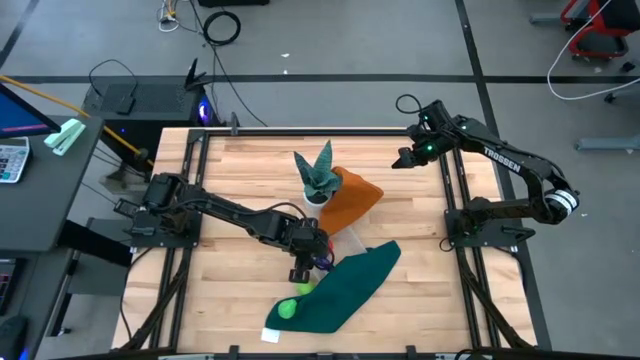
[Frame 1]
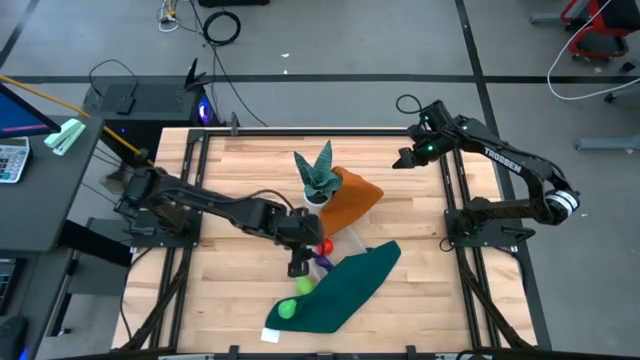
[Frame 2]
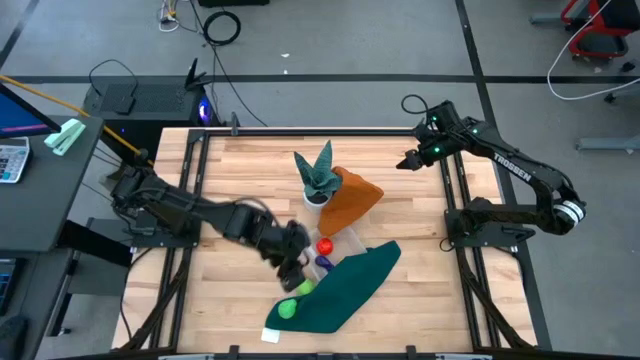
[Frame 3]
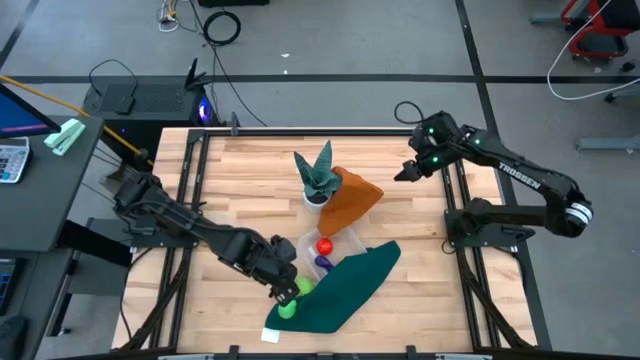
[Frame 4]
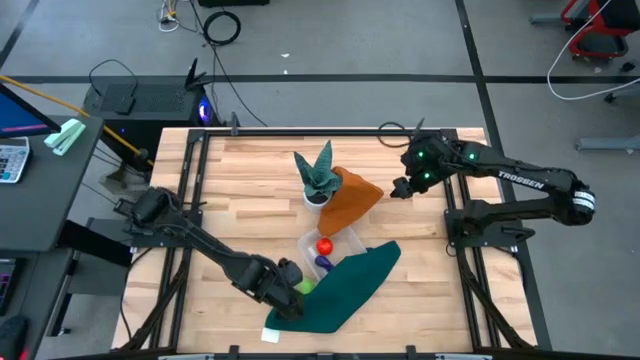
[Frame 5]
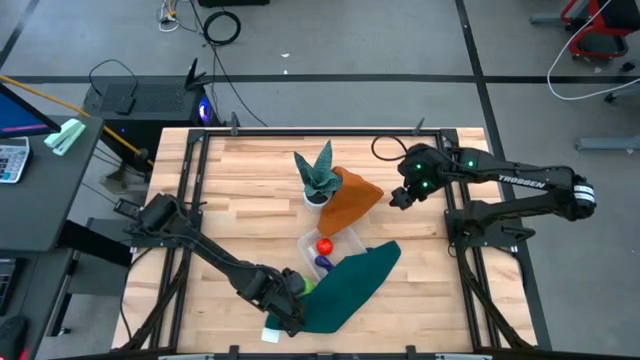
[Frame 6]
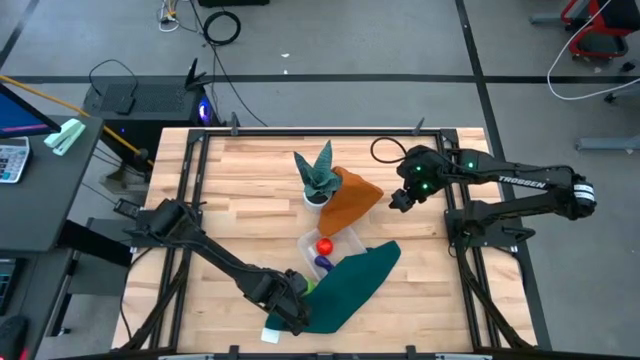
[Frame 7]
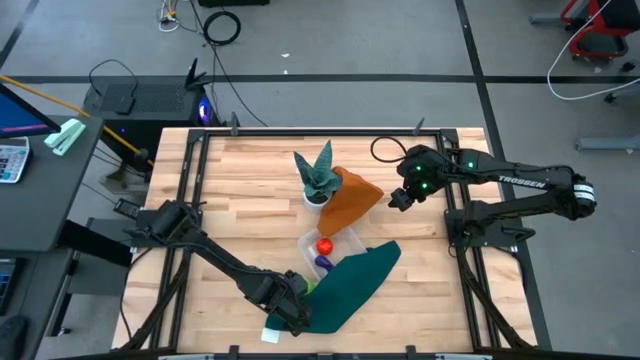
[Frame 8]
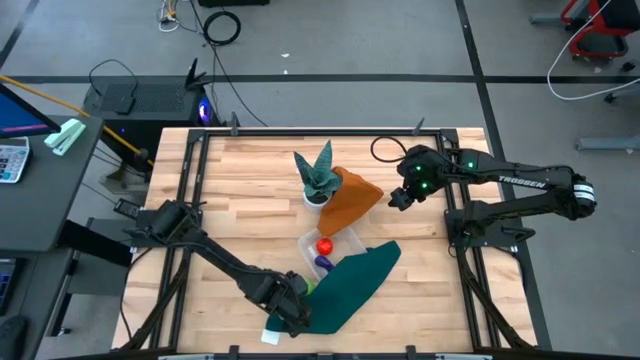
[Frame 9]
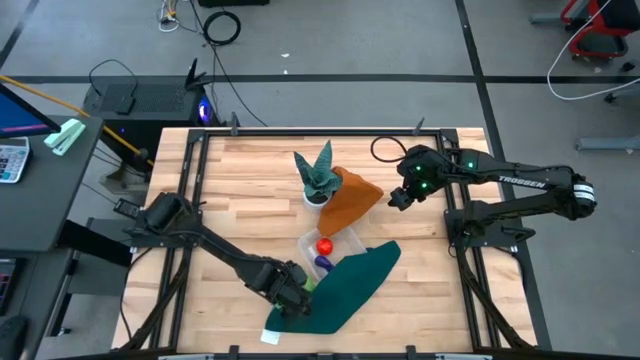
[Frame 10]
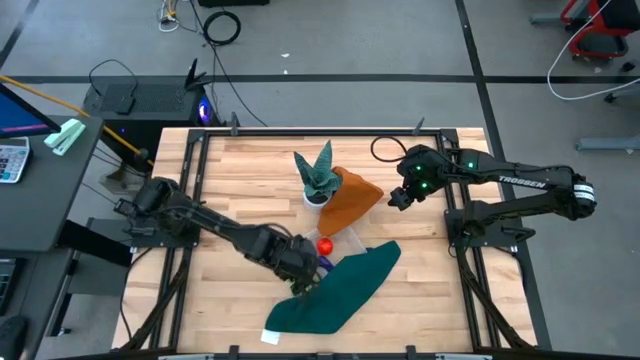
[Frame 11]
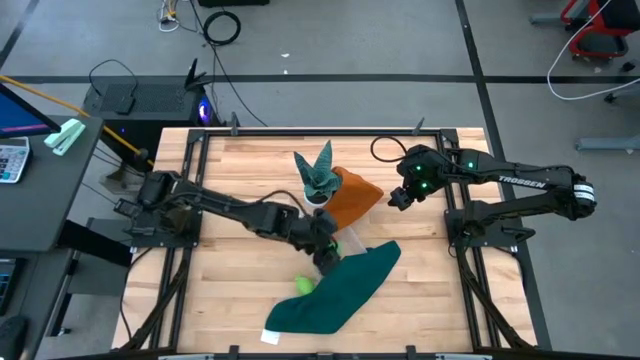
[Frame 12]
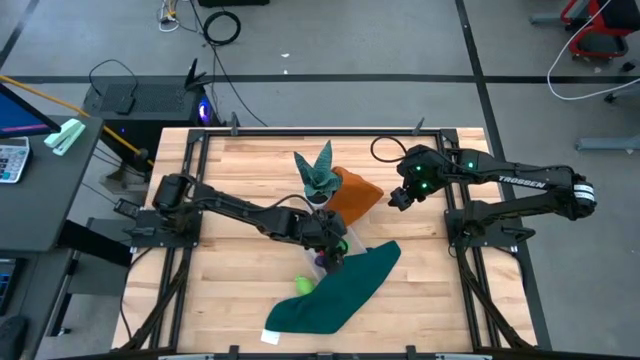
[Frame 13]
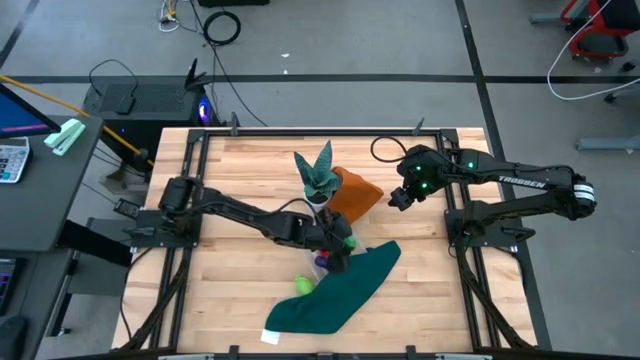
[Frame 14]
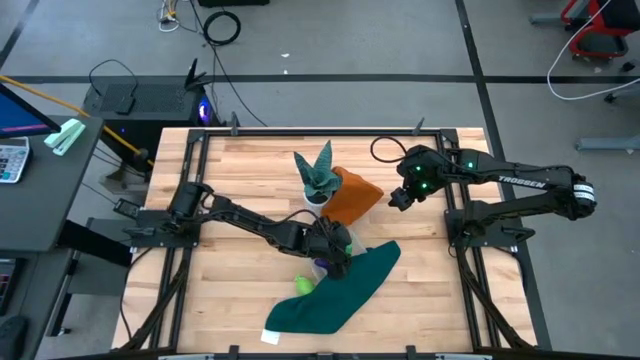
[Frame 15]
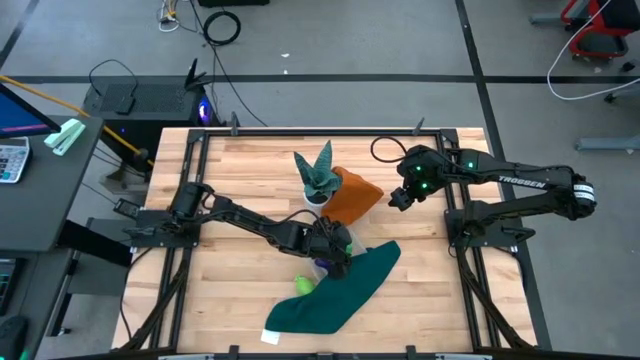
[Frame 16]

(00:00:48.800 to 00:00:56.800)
Task: Pick and placing Produce into tupperware
Put the green pear into the transparent bin

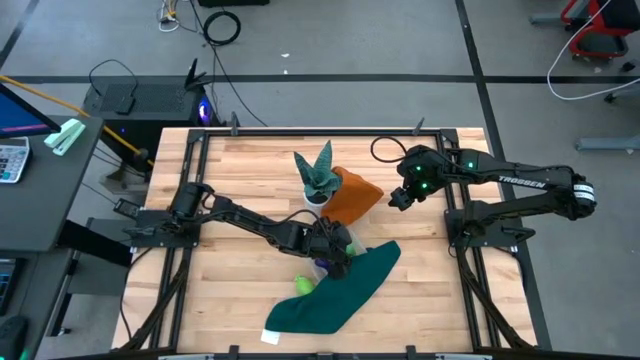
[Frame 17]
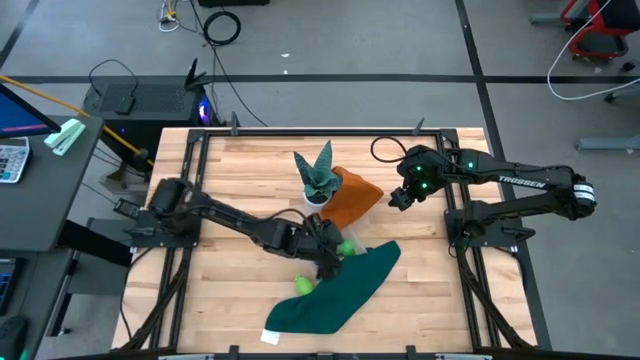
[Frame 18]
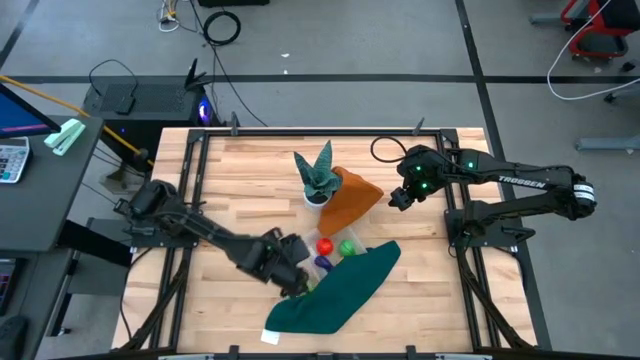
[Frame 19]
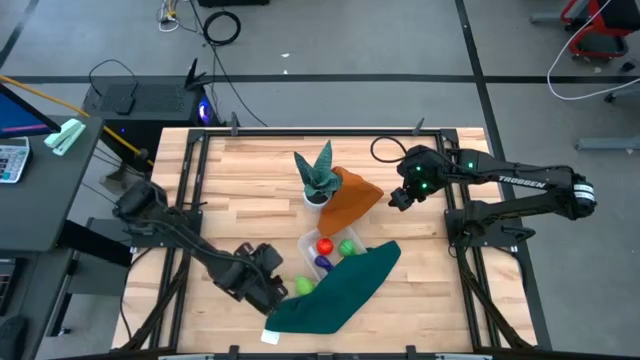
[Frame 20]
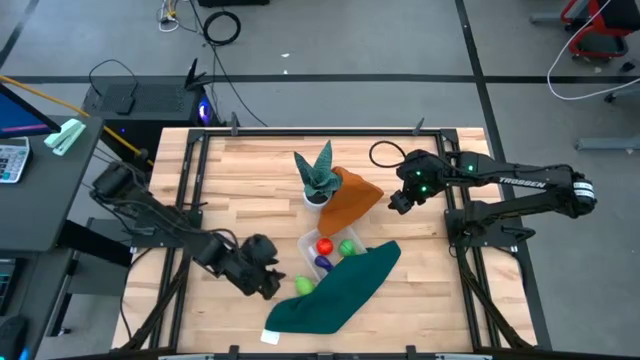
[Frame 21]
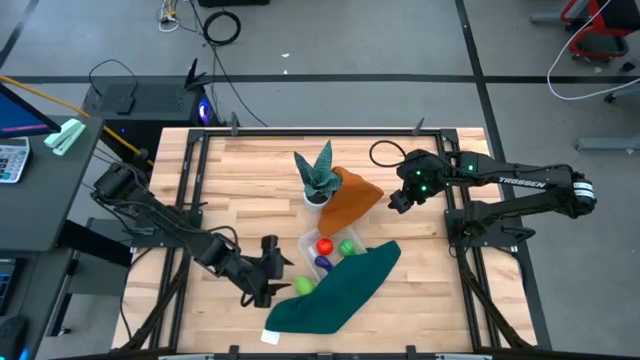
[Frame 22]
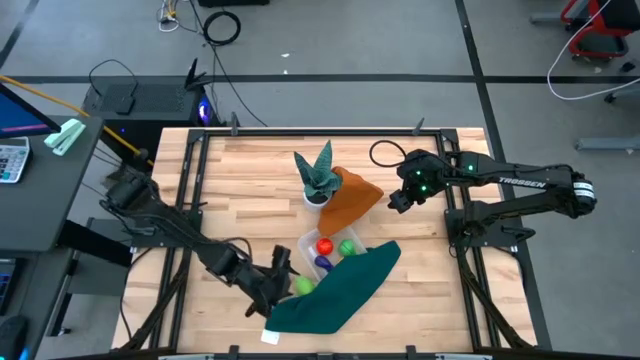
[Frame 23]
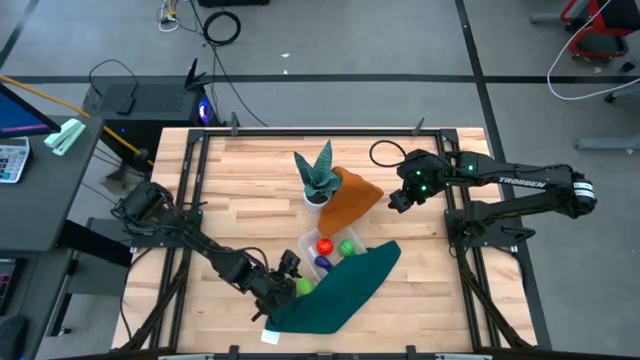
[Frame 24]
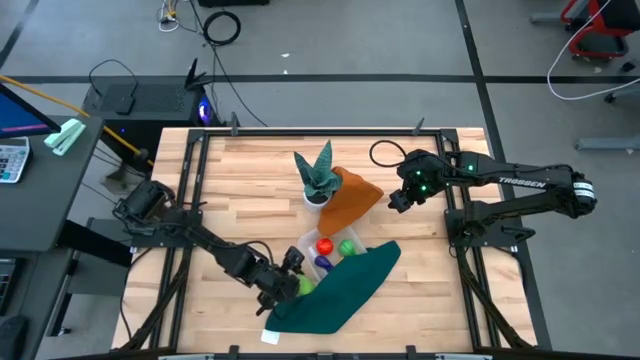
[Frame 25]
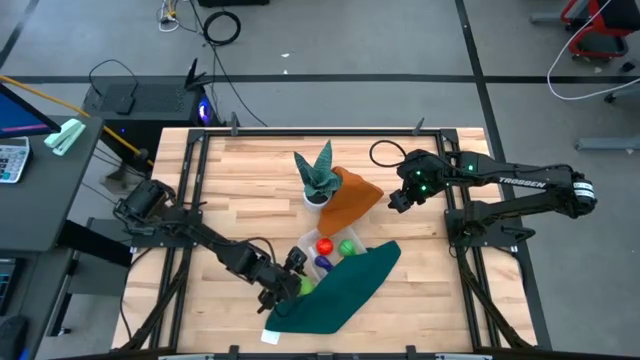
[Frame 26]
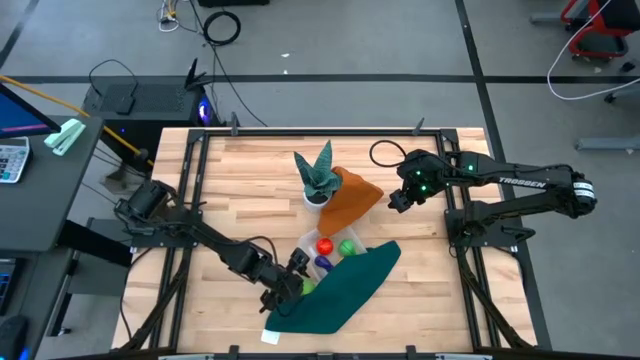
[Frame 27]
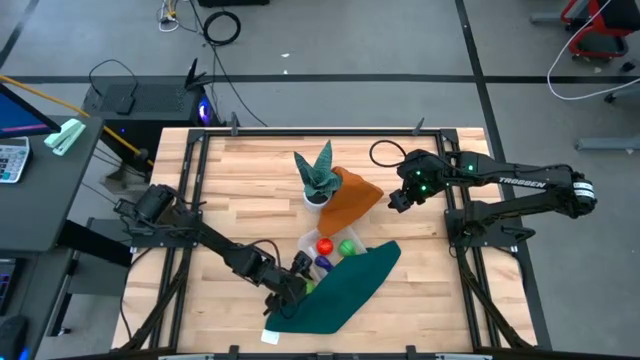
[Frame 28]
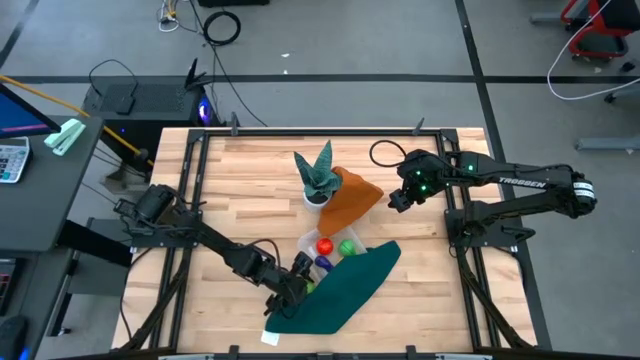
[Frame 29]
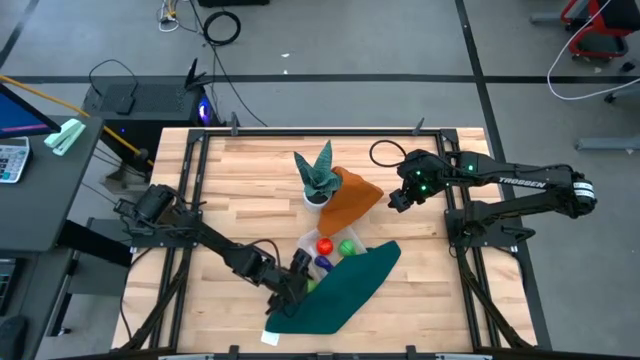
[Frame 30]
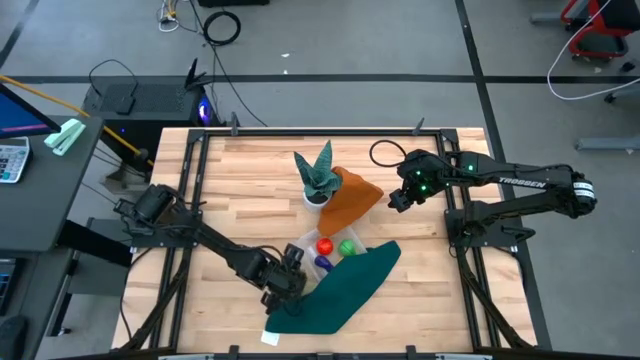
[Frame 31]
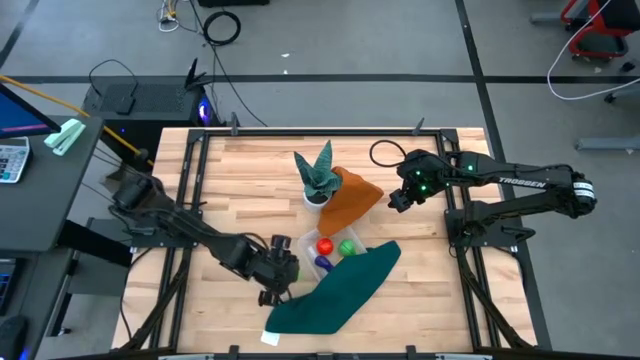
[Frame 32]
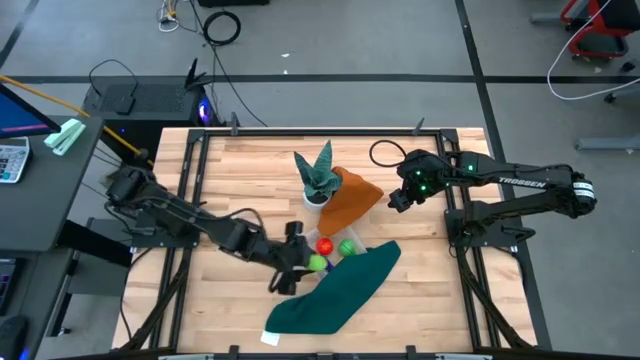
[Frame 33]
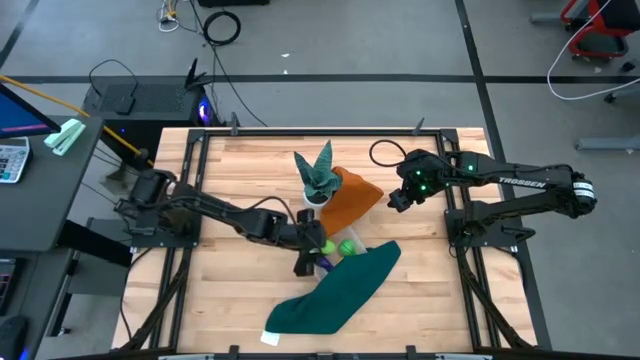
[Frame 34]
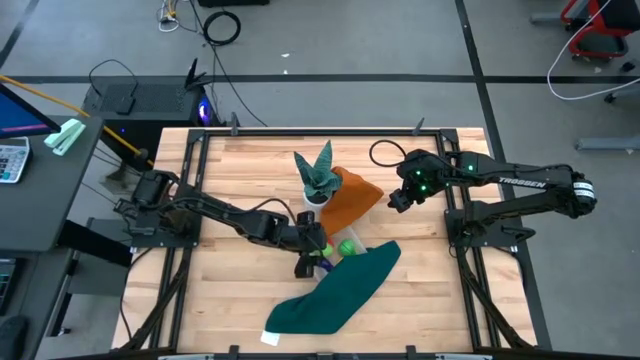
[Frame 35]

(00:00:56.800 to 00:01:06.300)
Put the green cantaloupe into the transparent bin

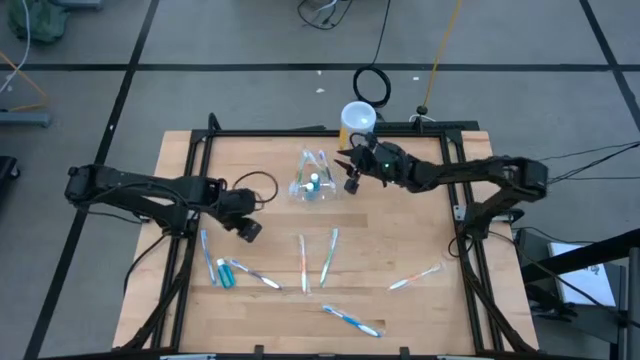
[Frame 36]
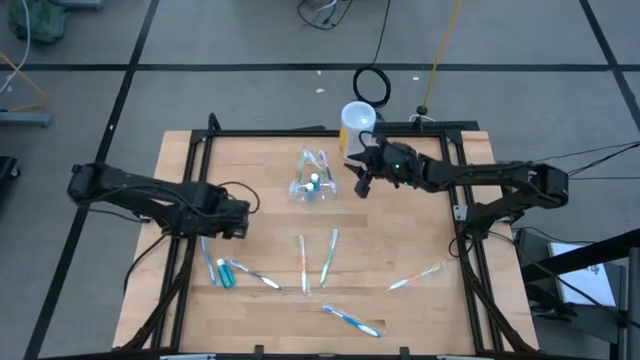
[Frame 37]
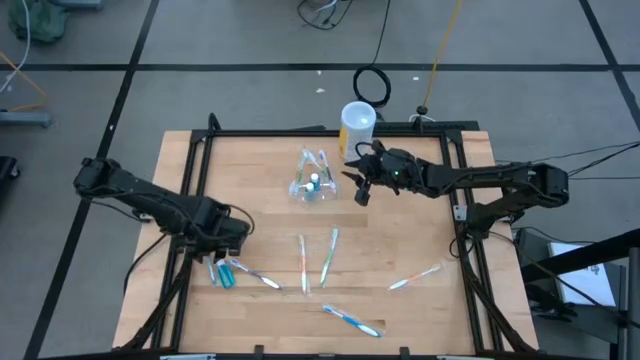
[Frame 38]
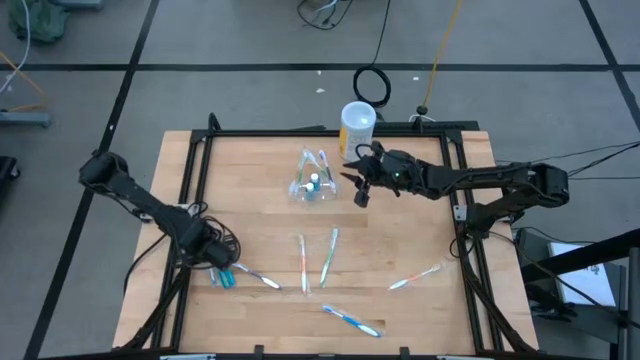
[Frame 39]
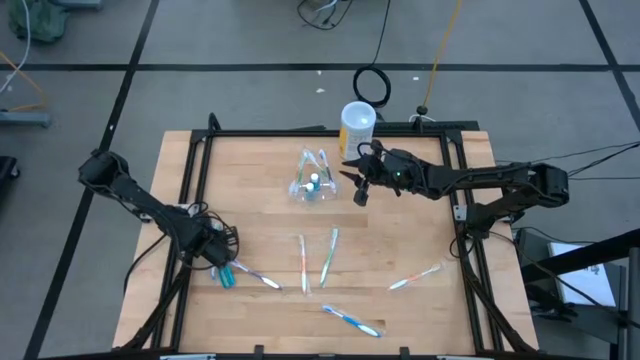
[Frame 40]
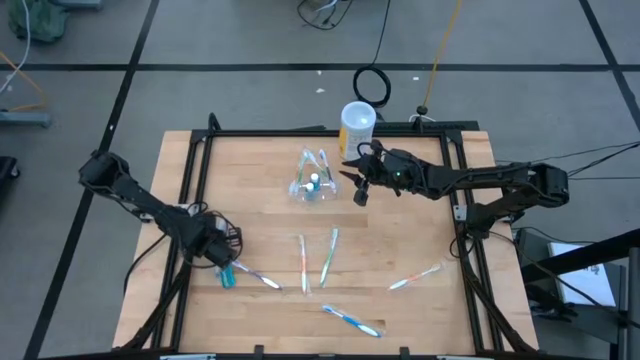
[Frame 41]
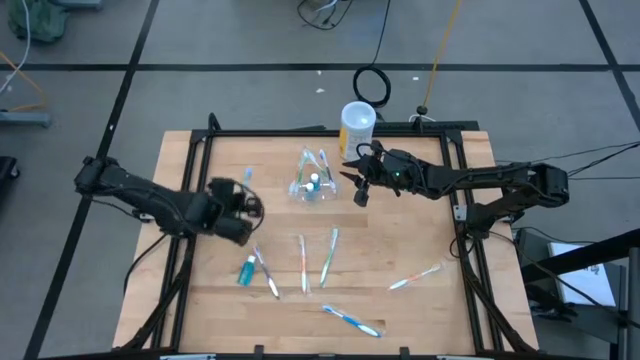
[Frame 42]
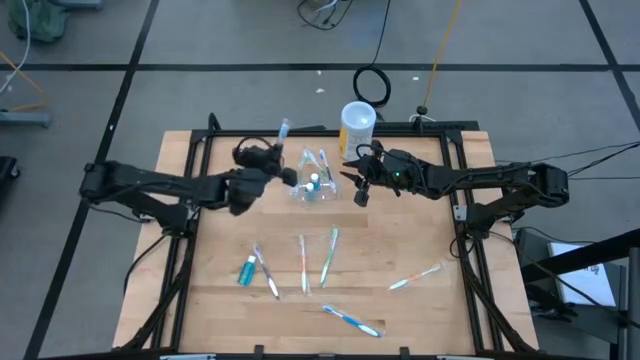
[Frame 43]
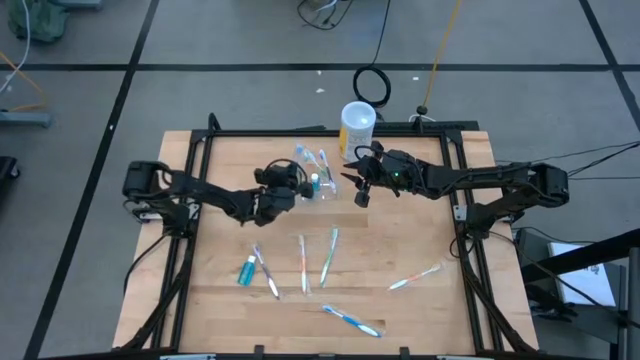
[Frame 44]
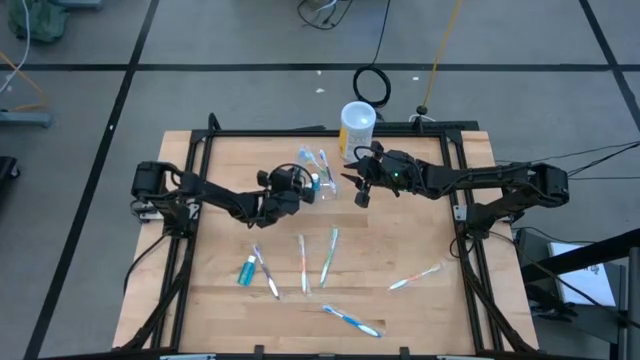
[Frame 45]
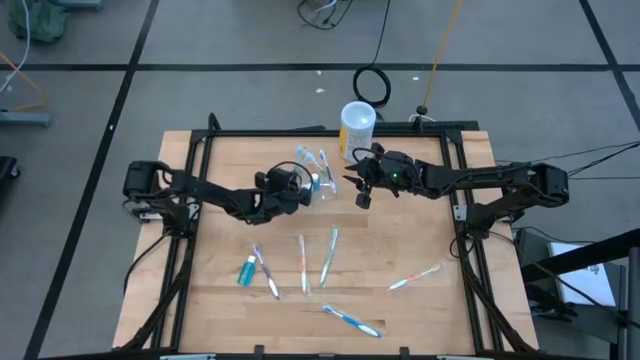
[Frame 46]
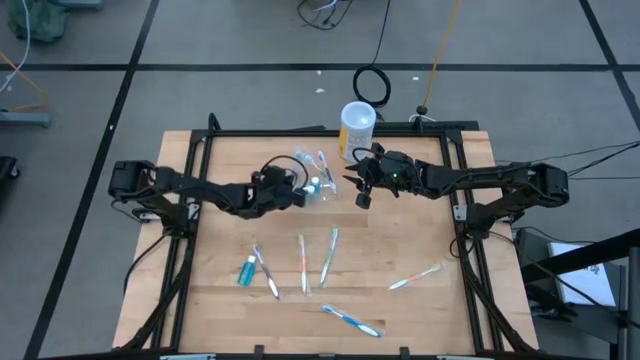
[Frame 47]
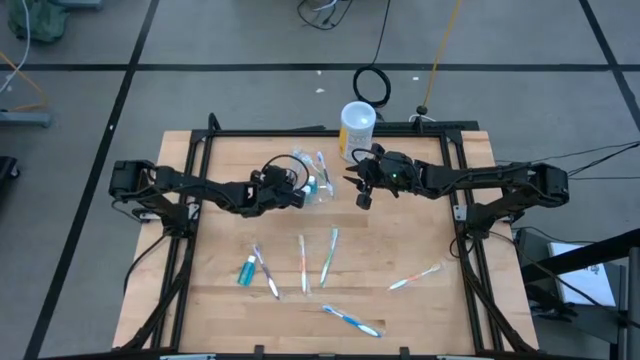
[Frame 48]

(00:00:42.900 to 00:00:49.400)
Task: Pick & Place toothbrushing station
Put the left blue toothbrush into the transparent organizer
